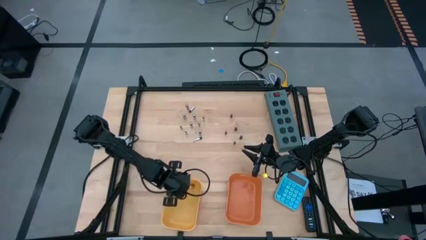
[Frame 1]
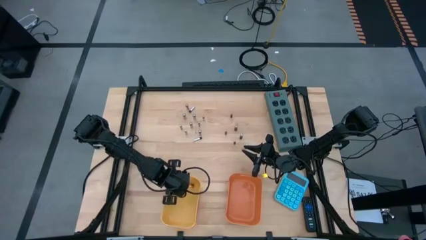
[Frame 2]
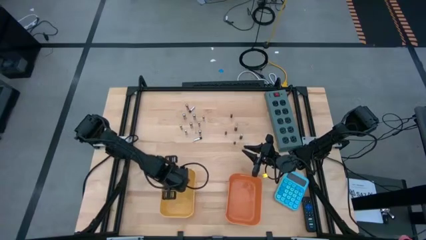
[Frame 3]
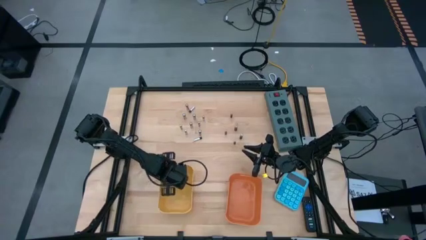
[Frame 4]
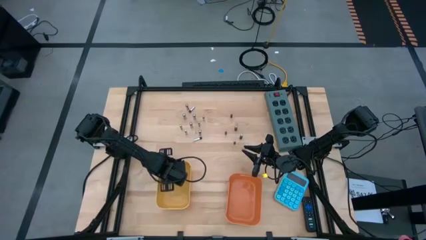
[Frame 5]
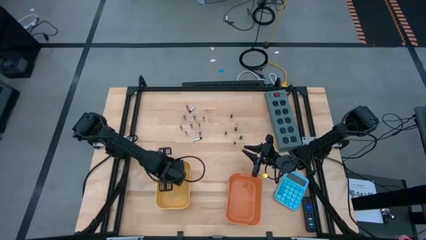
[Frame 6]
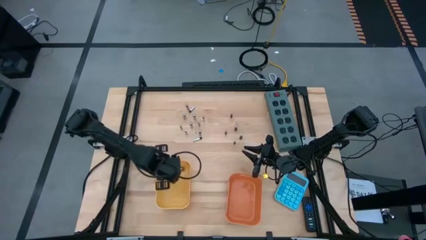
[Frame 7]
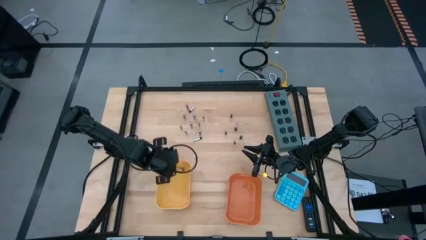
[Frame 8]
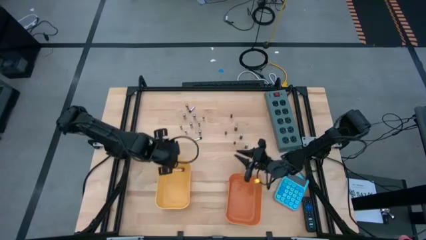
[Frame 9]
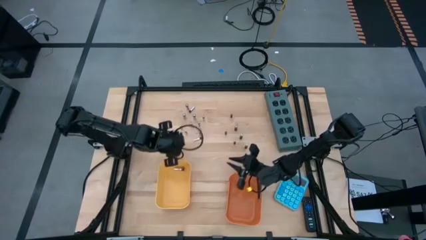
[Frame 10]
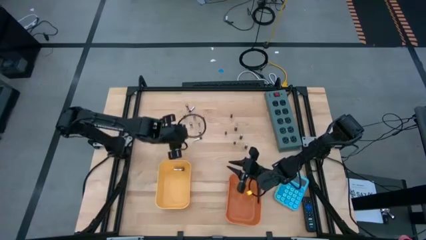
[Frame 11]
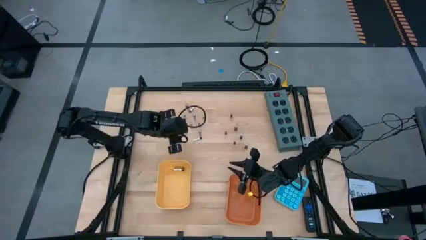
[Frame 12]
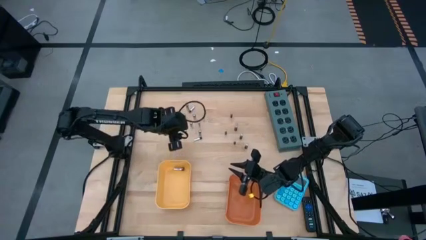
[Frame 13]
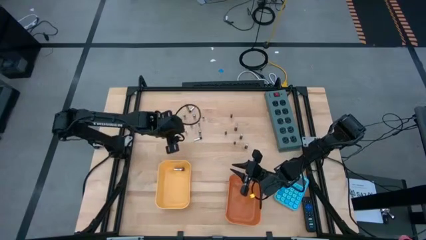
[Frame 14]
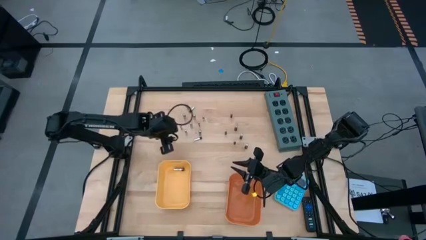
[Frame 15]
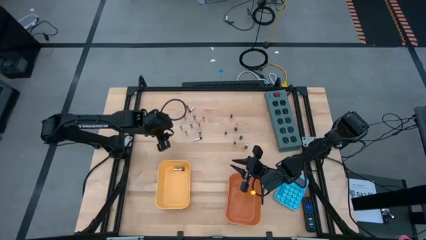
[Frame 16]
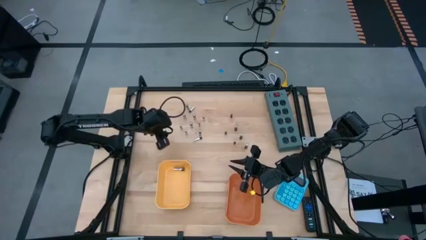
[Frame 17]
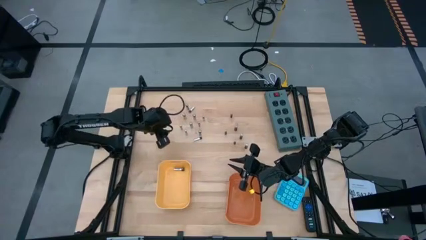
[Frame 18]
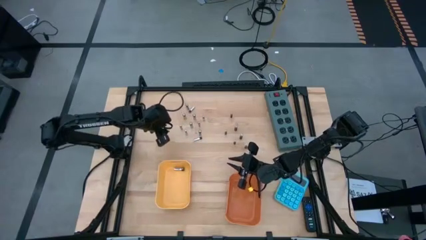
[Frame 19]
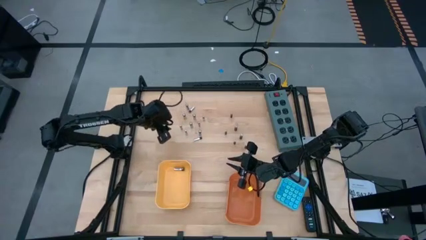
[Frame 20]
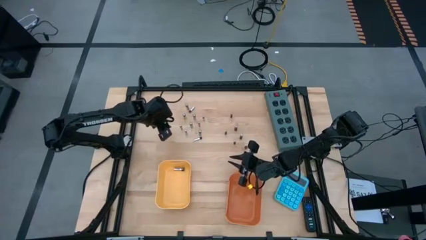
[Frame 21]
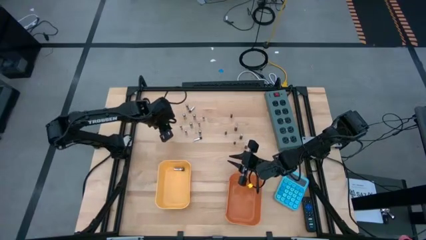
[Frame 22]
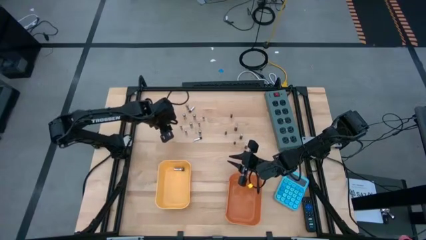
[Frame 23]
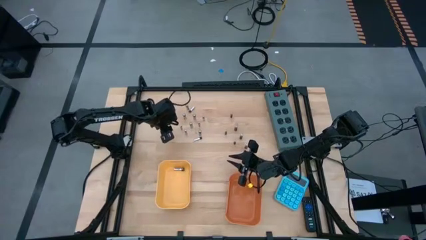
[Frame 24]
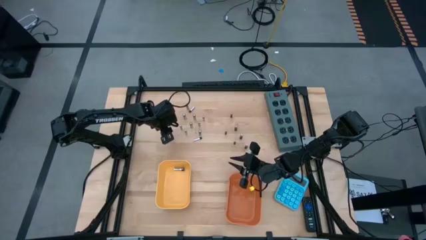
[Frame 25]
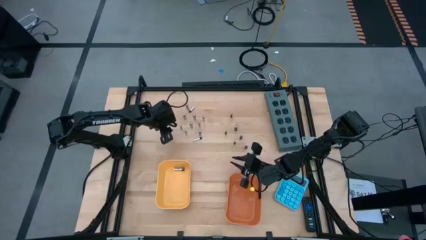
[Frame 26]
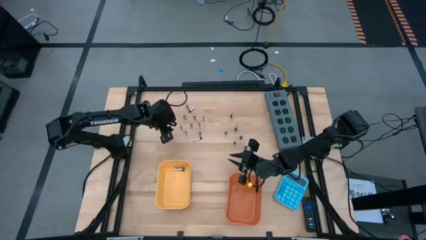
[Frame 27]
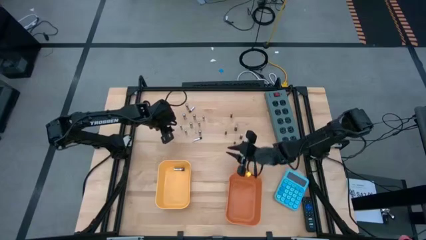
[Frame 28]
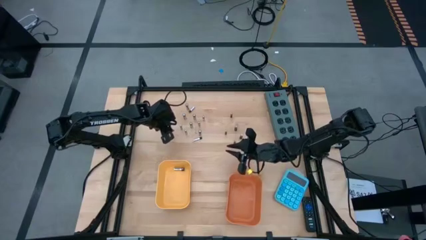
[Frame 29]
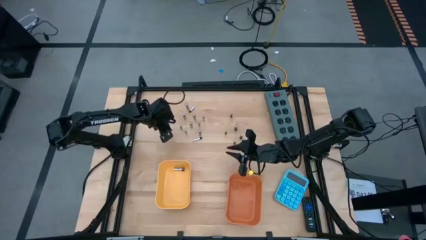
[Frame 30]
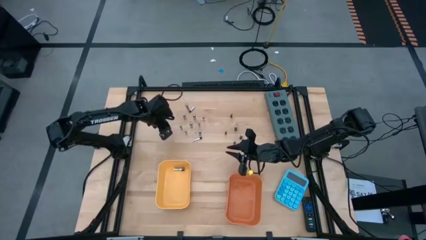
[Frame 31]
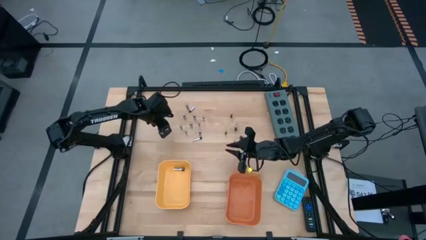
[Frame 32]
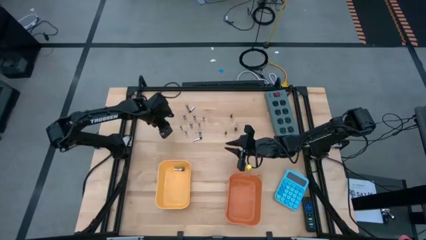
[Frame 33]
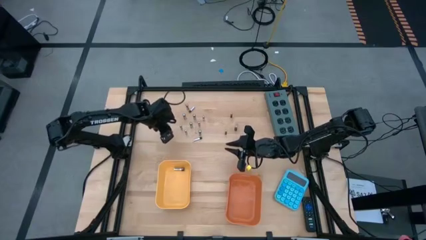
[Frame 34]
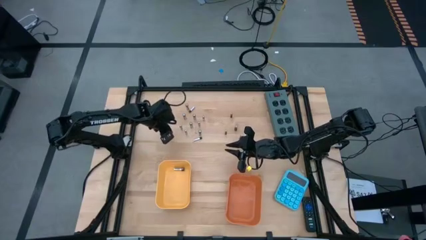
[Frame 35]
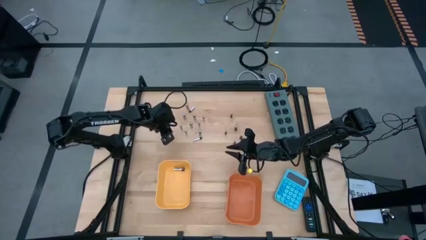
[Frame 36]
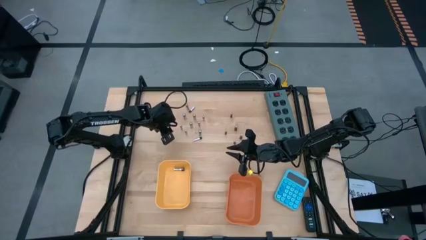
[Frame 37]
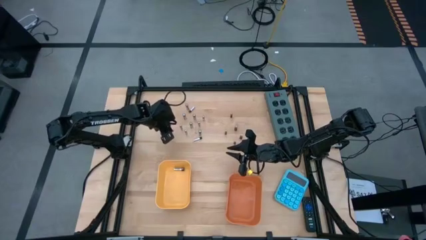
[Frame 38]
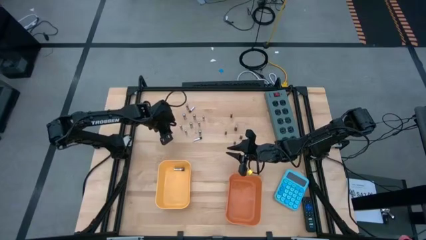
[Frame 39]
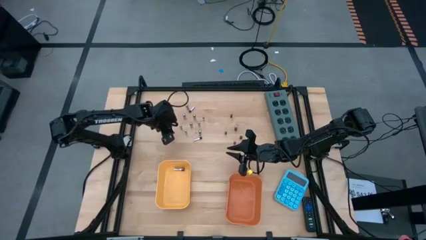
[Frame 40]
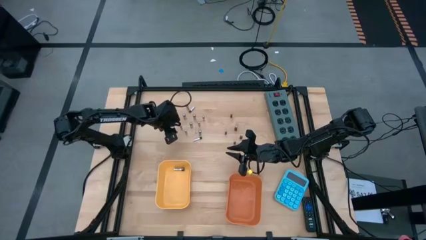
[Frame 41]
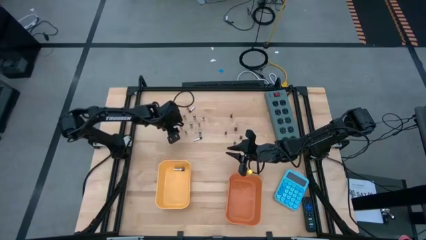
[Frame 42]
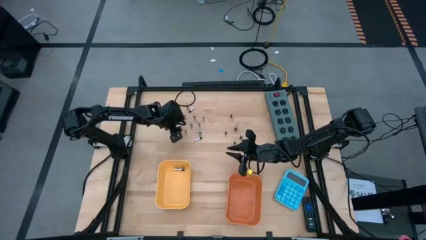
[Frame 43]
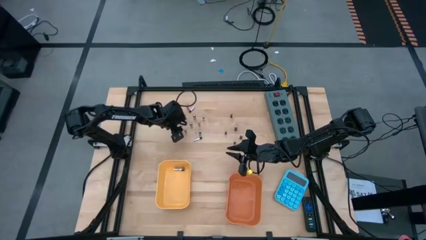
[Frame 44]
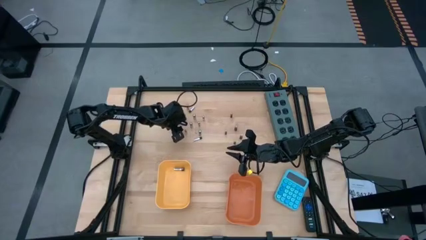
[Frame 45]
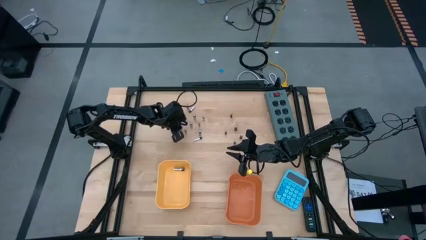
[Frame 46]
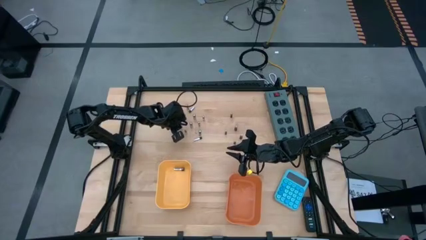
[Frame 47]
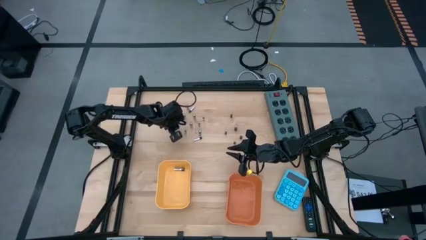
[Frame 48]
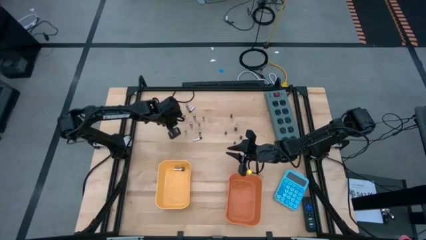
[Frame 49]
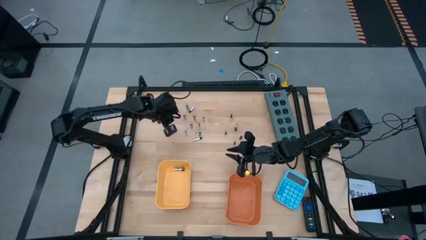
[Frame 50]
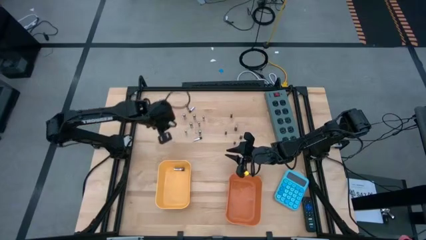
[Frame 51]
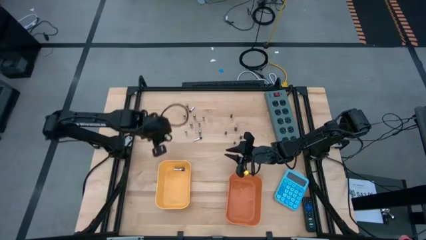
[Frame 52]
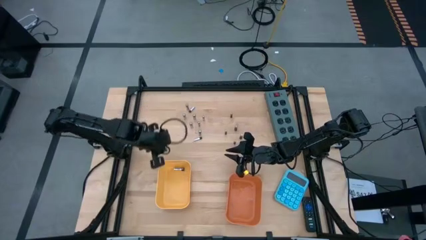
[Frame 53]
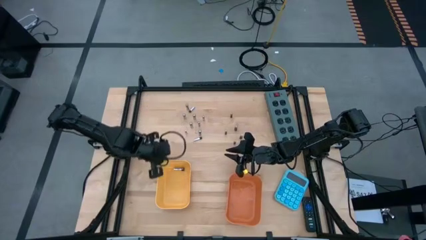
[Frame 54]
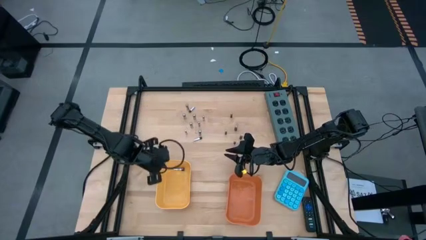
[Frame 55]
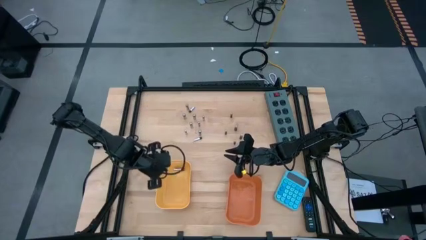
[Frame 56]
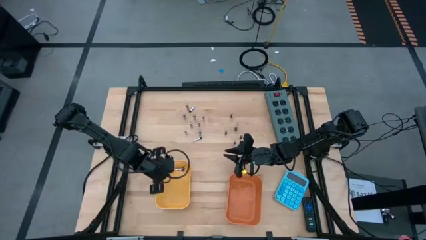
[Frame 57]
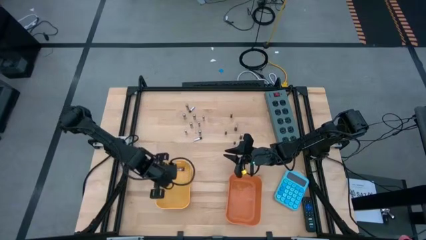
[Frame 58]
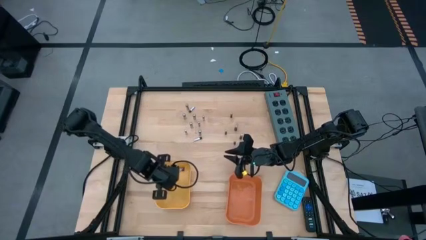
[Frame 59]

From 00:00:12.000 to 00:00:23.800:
Task: Sort batteries
Put the silver battery into the yellow bin

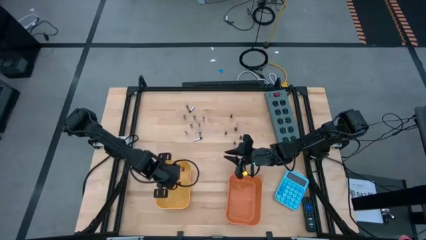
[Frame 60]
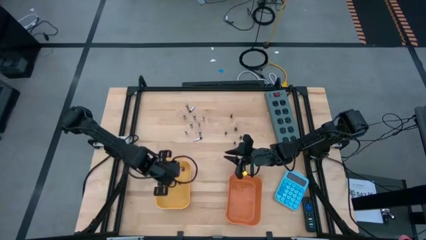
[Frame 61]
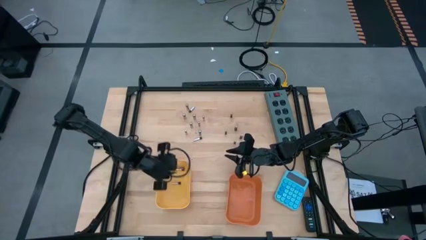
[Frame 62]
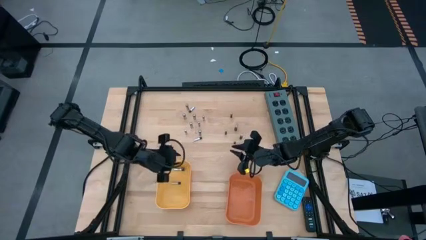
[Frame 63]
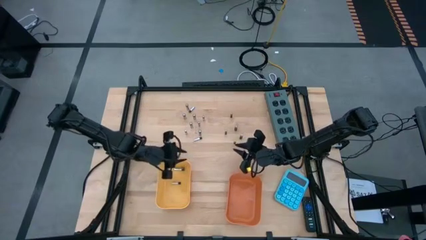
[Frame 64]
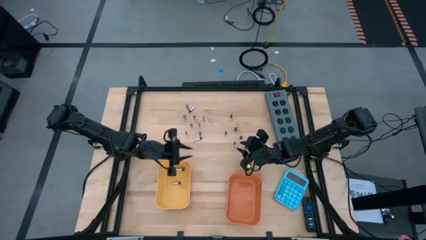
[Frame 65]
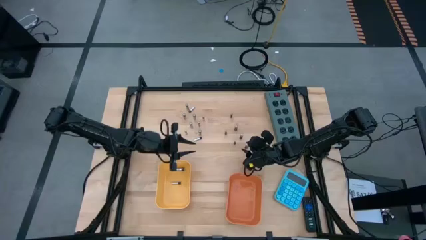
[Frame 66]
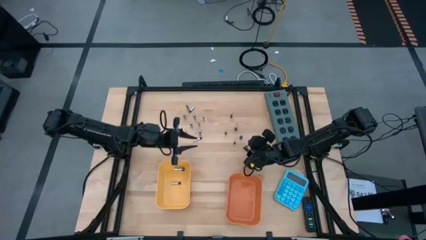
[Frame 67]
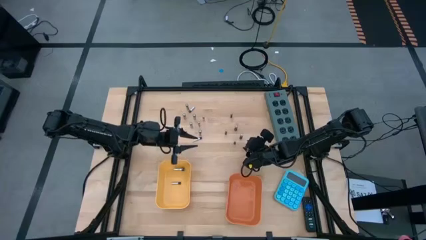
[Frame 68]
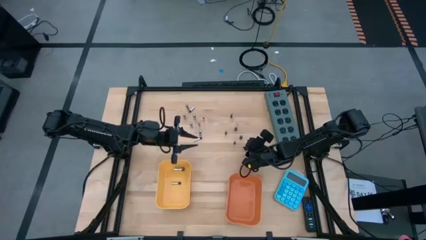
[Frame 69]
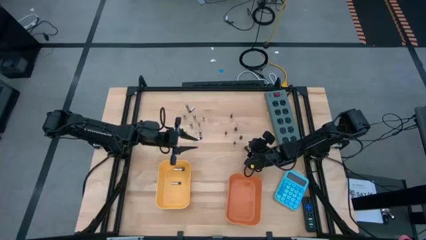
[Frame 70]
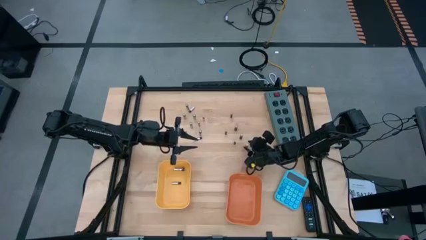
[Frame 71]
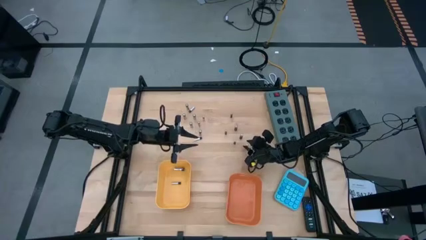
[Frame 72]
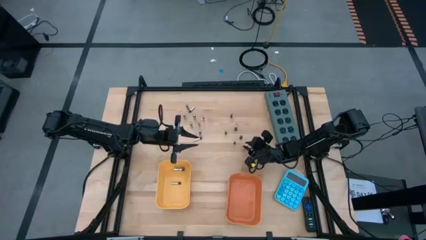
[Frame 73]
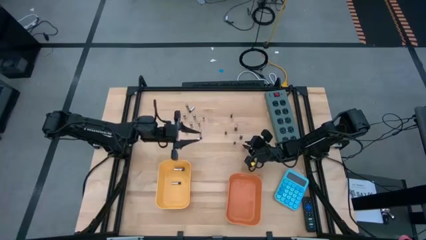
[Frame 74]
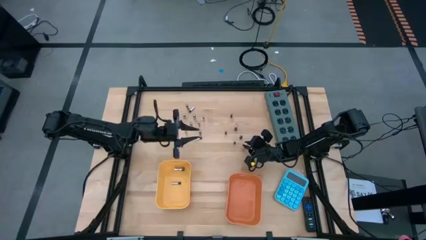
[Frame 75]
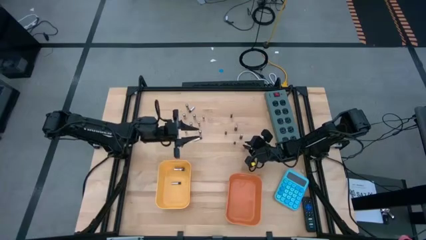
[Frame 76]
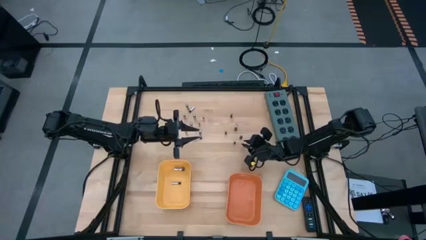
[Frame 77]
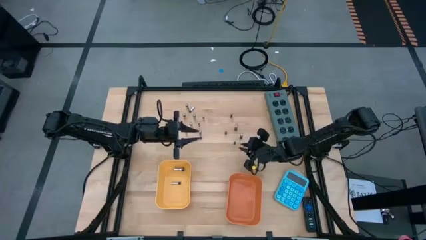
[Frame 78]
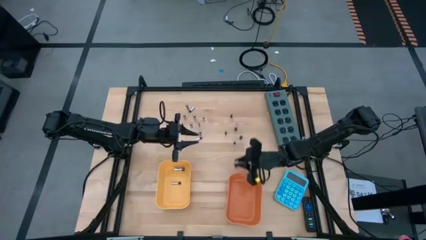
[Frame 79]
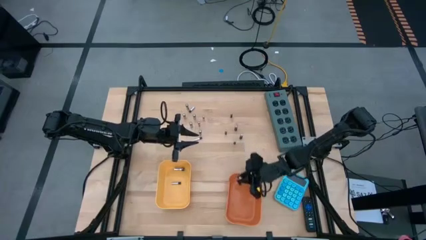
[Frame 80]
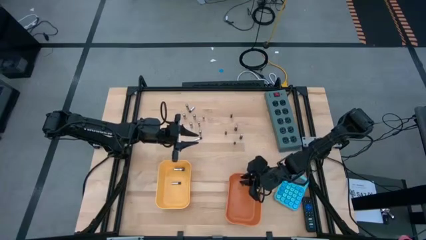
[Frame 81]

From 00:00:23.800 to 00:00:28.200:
Put the black battery into the orange bin

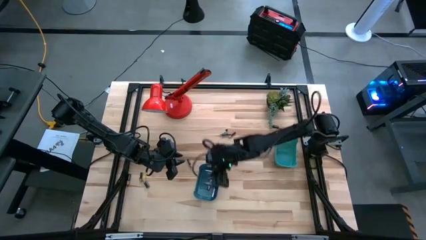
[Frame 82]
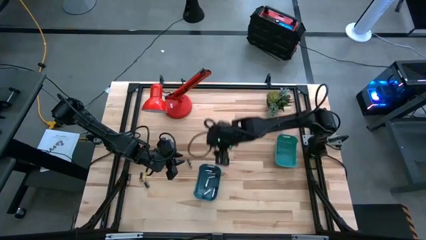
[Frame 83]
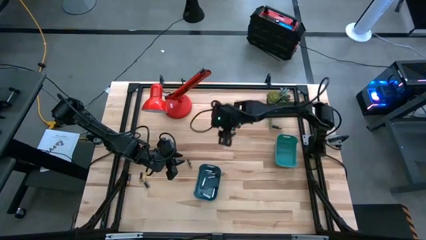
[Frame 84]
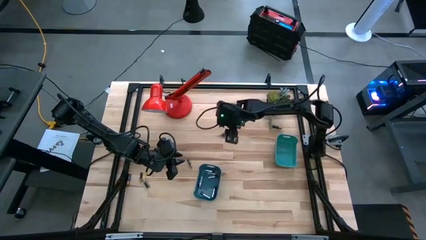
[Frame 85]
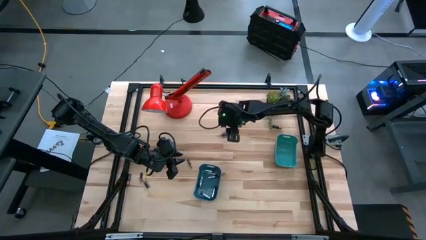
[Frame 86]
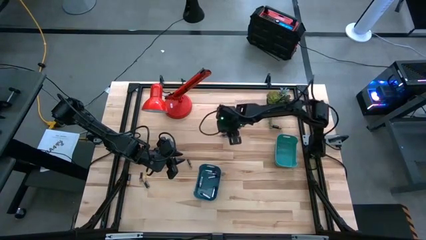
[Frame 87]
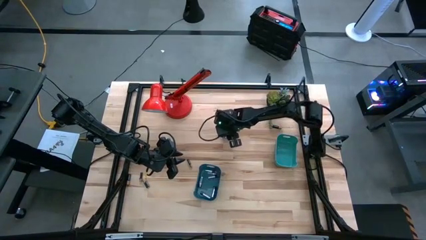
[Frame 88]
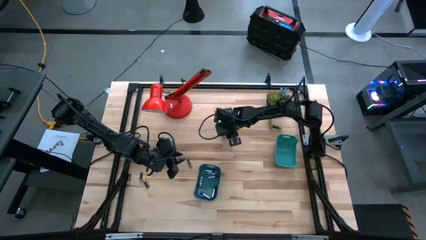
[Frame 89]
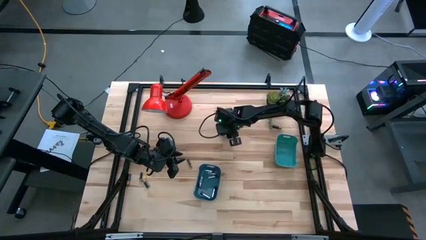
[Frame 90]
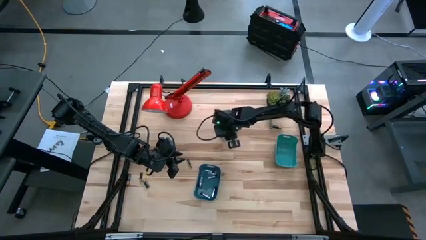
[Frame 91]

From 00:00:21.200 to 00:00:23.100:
Task: Sort batteries
Put the silver battery into the blue bin
